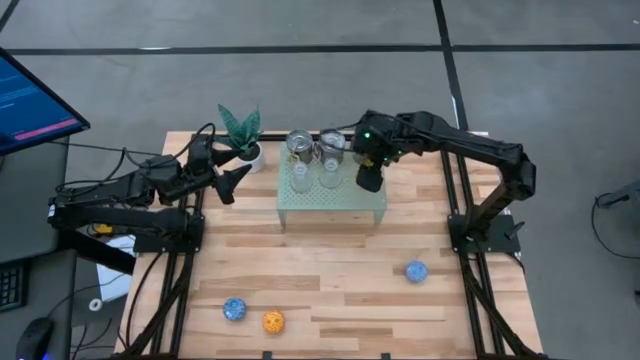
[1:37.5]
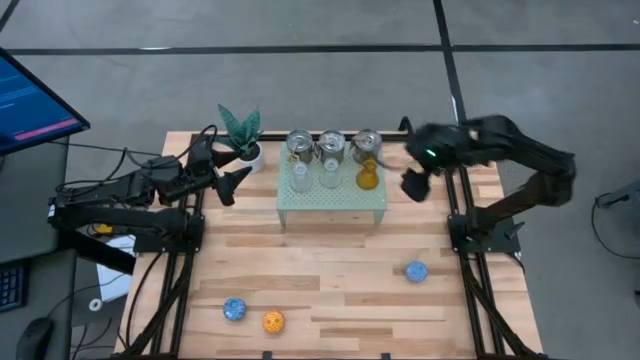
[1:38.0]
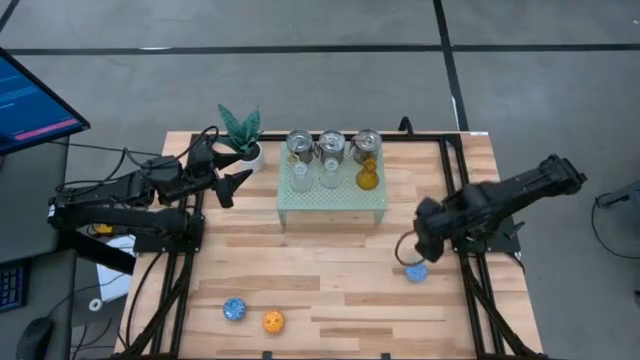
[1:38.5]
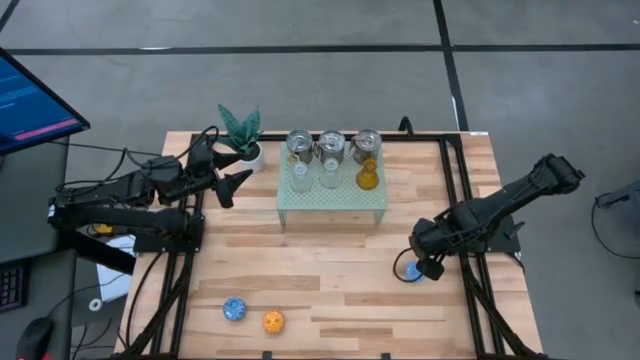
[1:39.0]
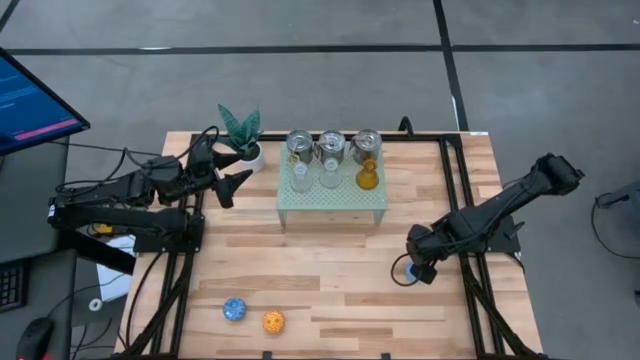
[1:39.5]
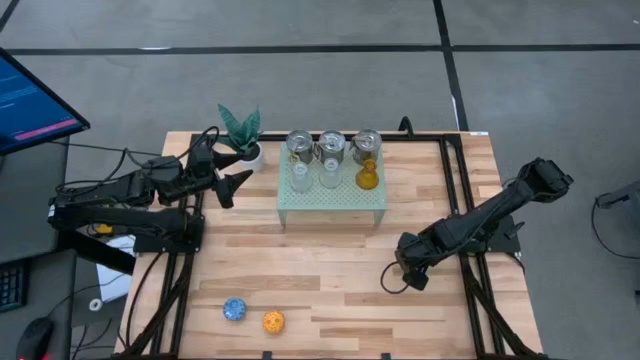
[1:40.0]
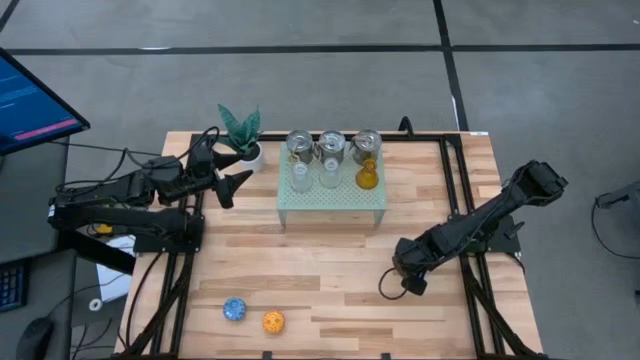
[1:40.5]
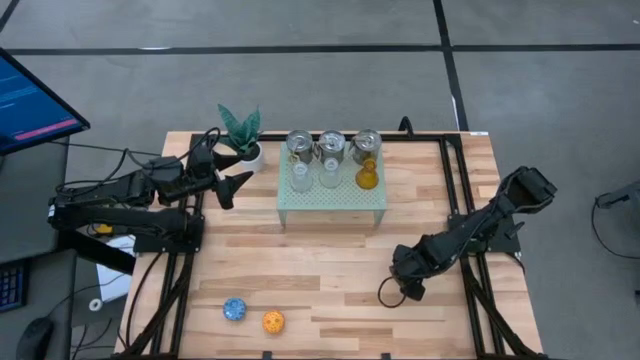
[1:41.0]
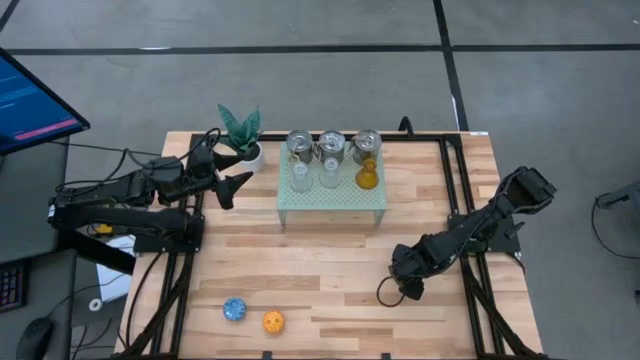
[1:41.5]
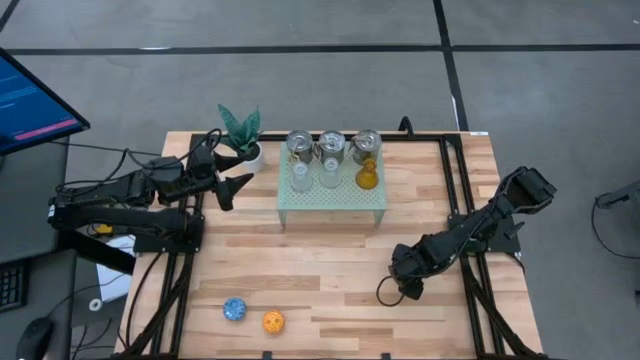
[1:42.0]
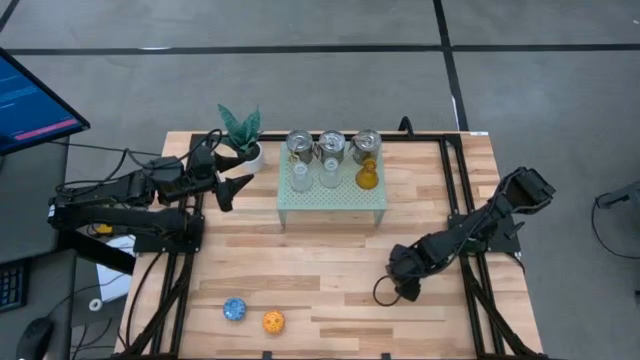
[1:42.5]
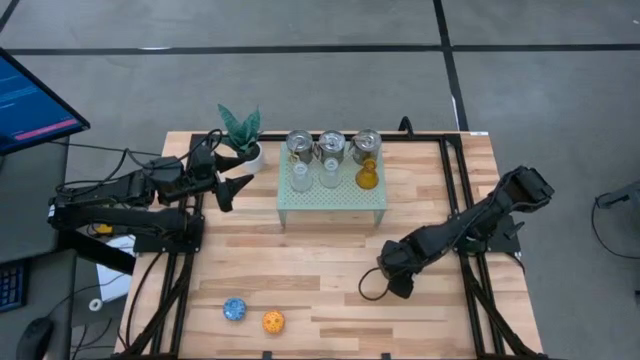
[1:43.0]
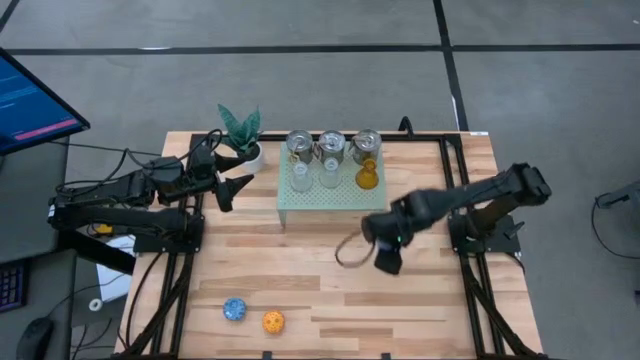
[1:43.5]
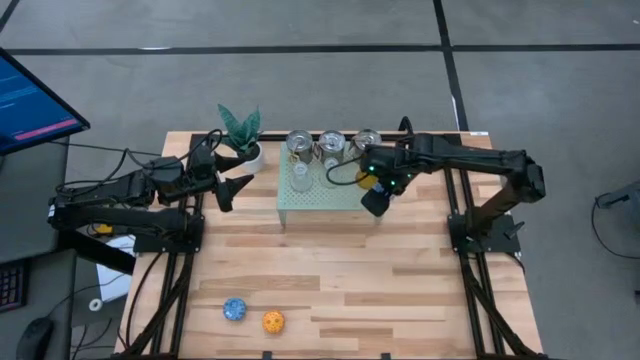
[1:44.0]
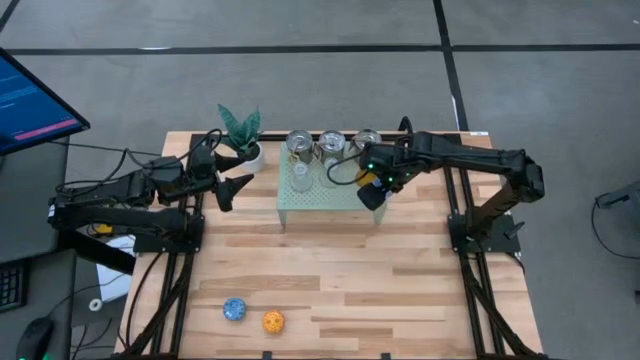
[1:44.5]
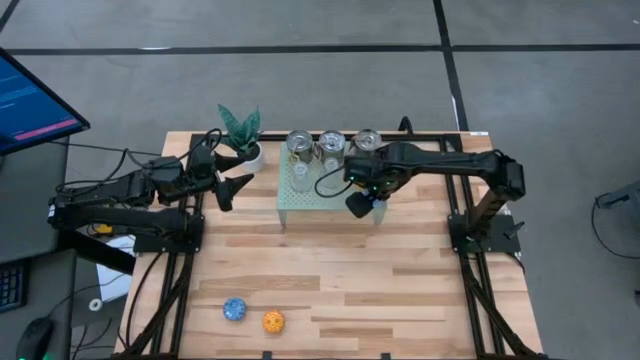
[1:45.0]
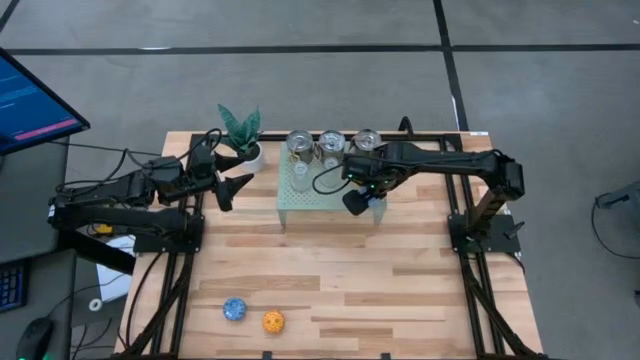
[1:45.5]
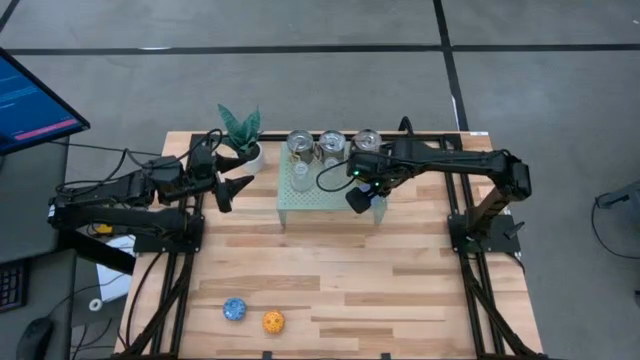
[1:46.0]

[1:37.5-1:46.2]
Task: Pick & Place candle stick holders
Put the light blue scented candle on the shelf

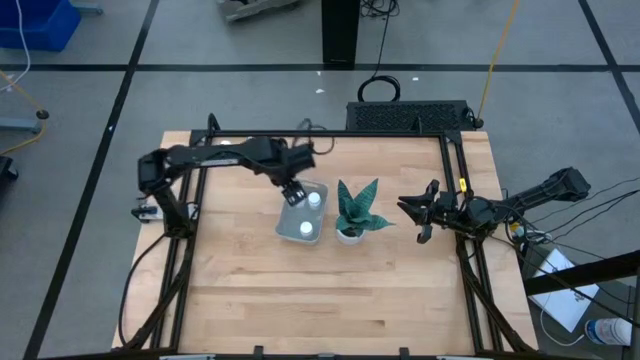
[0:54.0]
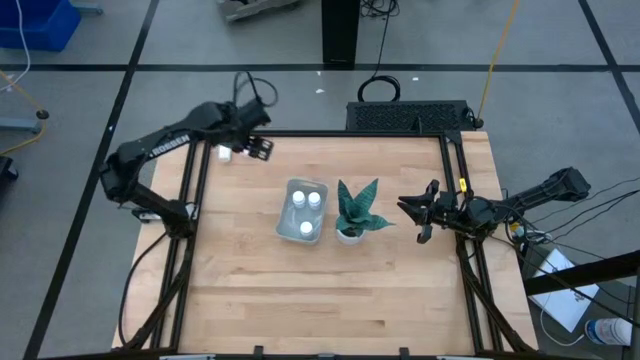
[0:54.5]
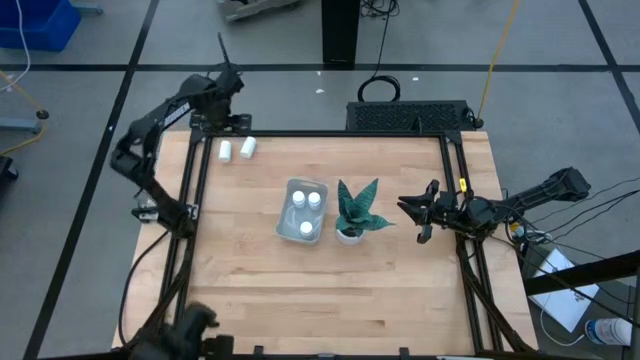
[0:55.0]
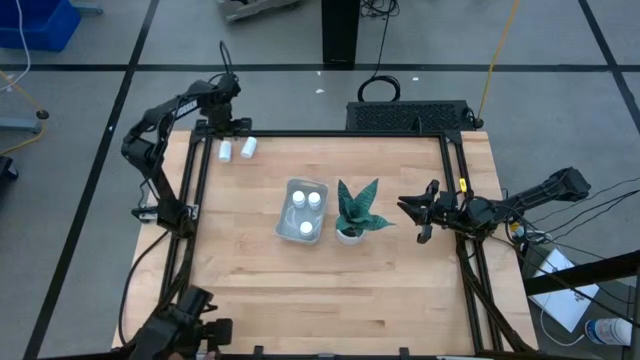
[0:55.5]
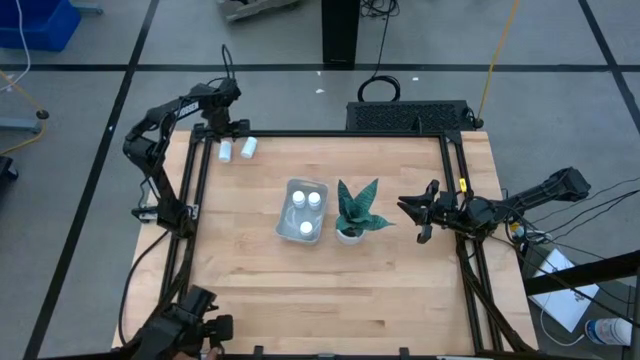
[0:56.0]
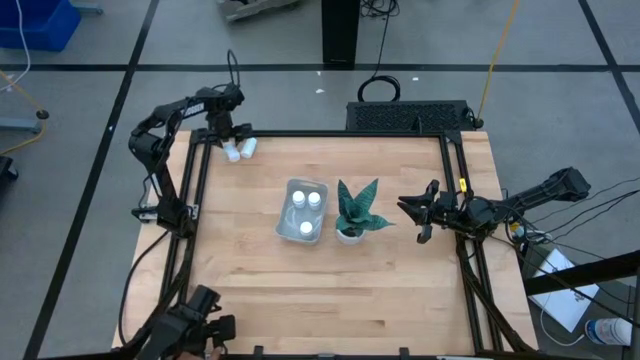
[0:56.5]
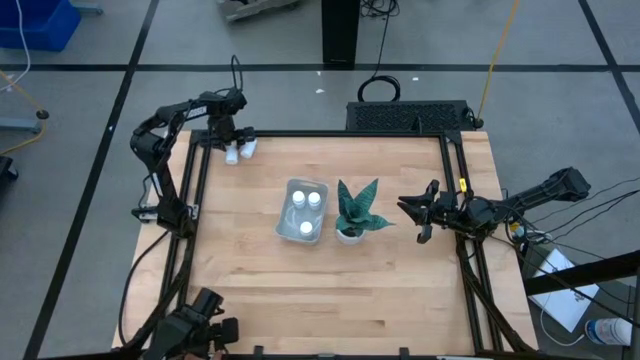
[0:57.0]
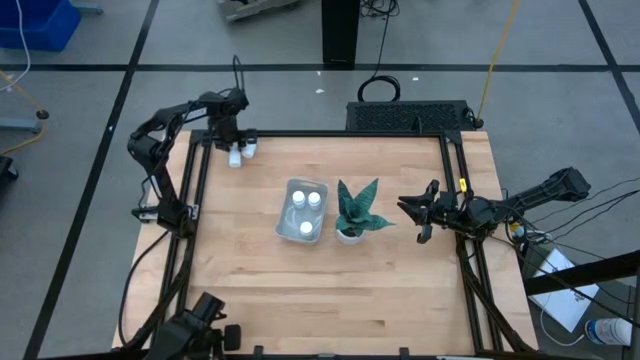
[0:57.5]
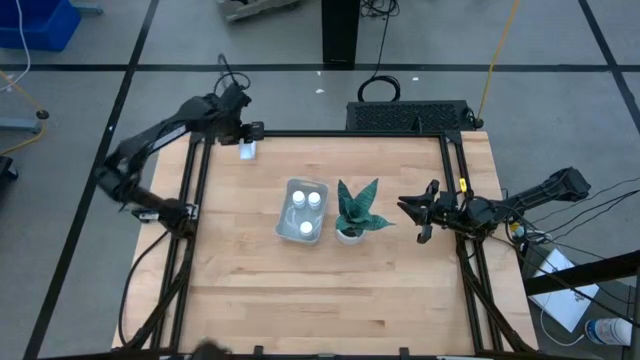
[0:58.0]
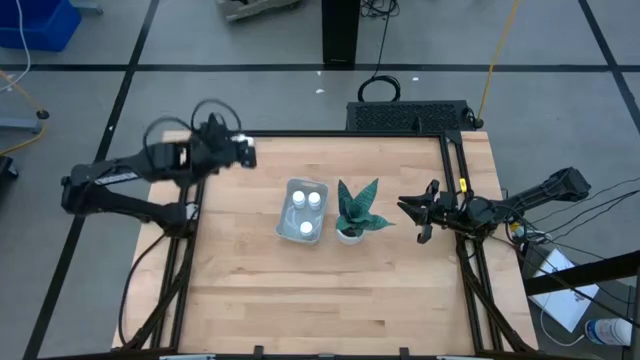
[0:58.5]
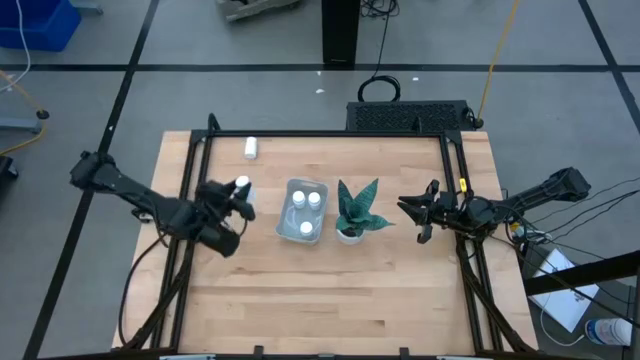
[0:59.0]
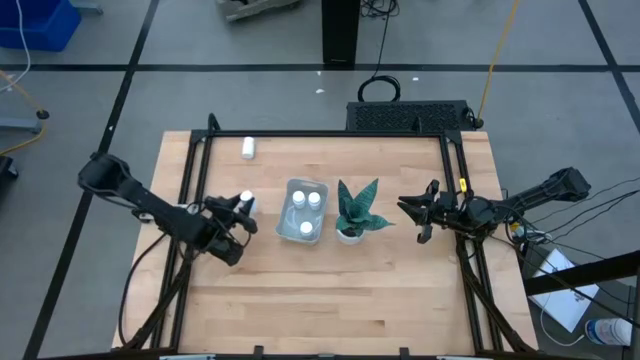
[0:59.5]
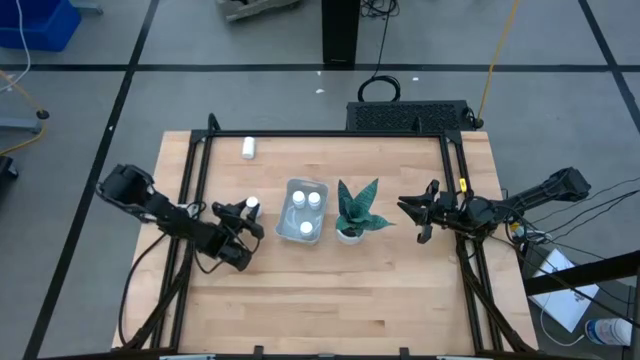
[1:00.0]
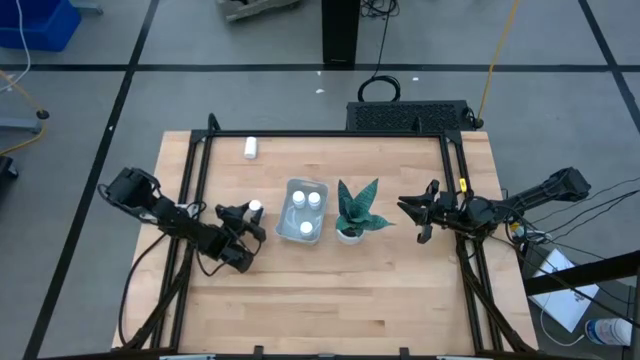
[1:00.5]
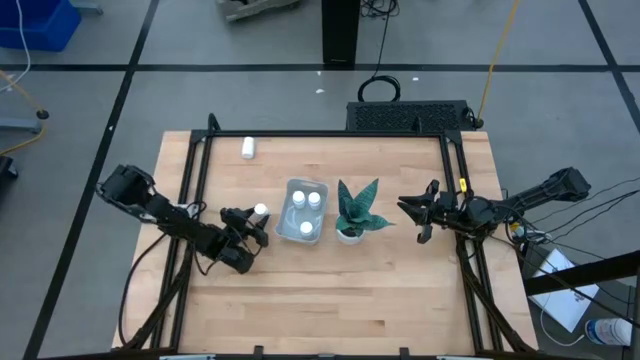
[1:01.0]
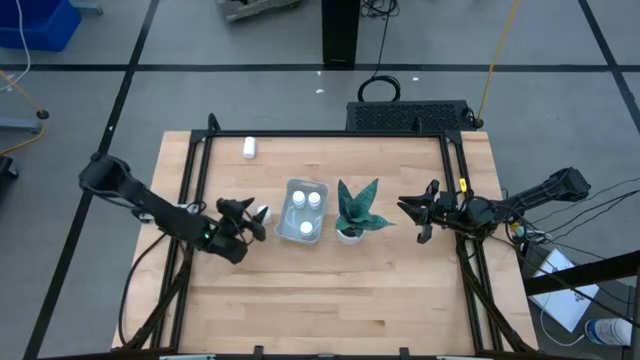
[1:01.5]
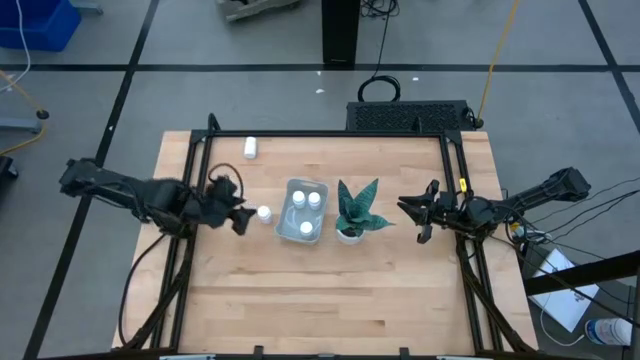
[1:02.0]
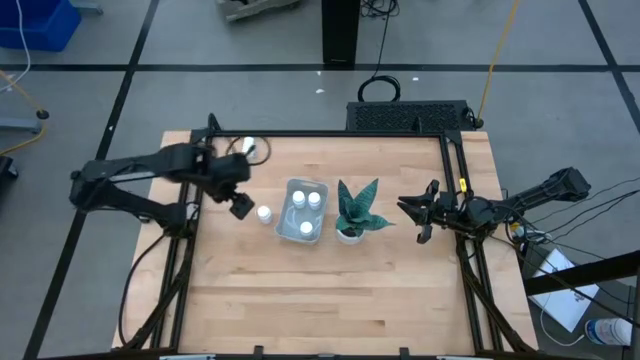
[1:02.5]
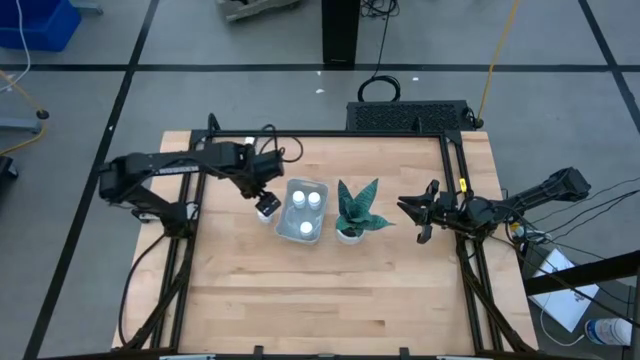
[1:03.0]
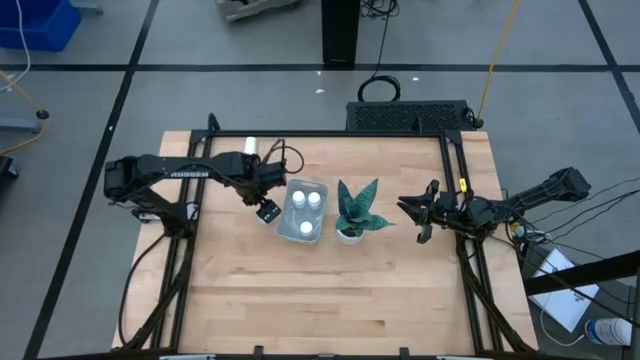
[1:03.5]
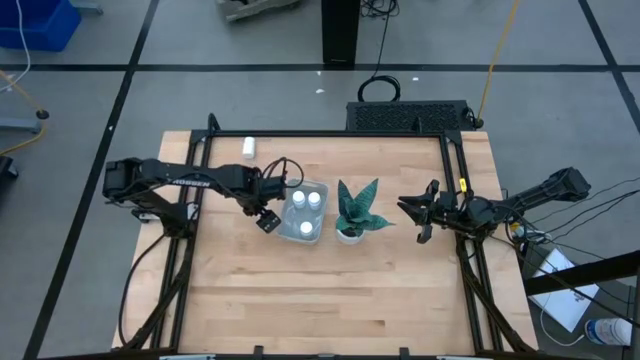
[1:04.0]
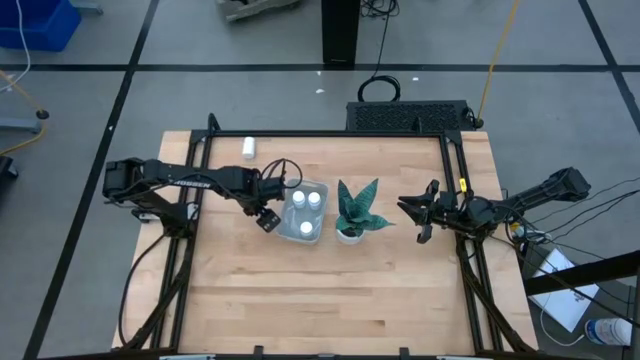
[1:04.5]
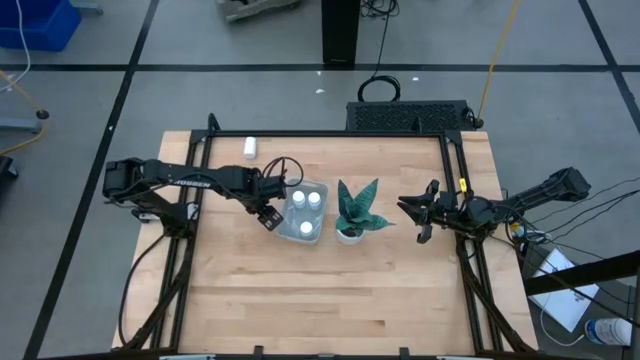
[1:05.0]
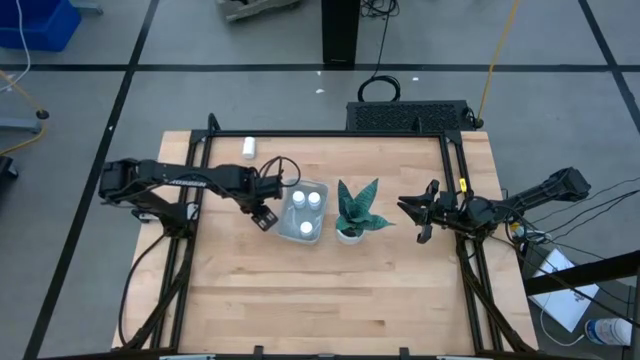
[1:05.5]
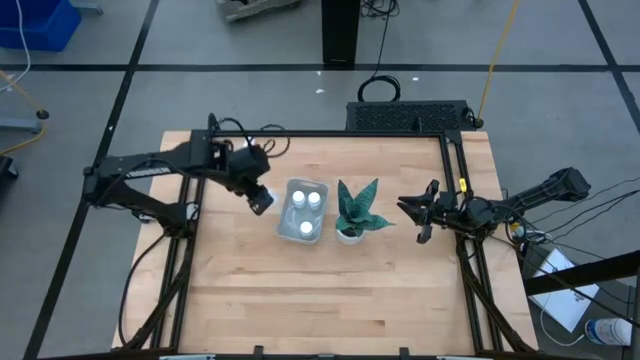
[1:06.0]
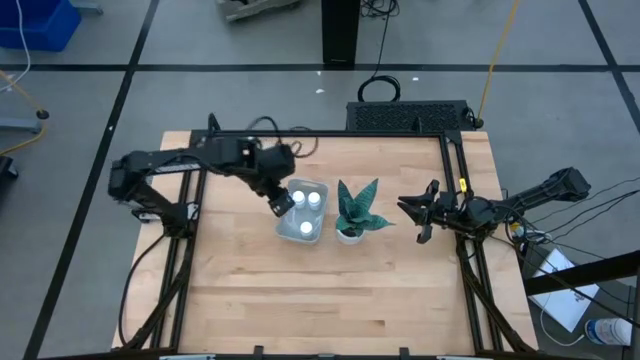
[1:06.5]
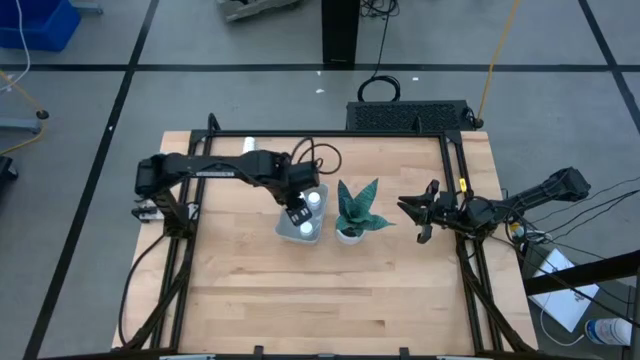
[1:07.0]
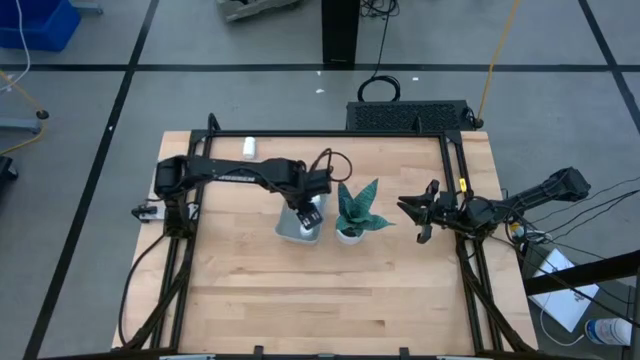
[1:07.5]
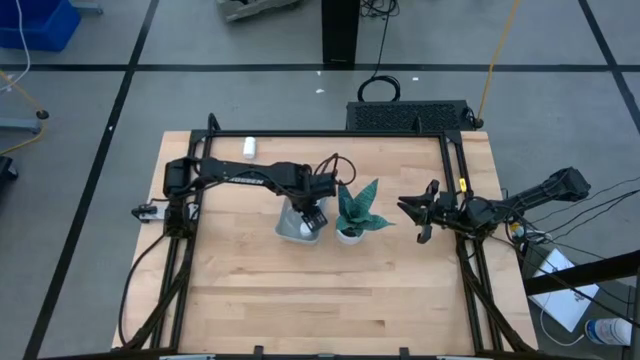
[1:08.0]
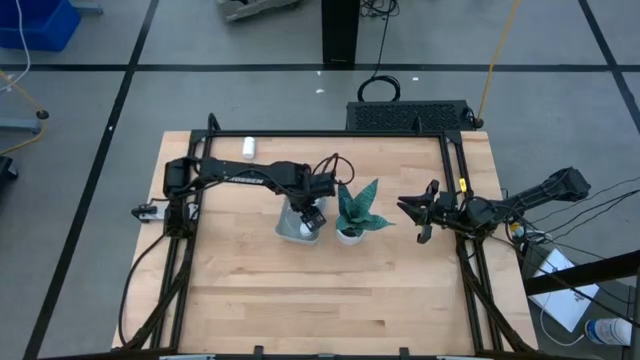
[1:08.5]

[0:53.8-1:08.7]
Task: Pick and place pill bottles into a basket
Put the white pill bottle into the gray bin
